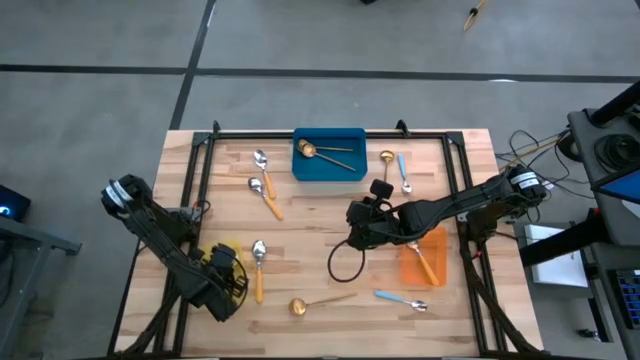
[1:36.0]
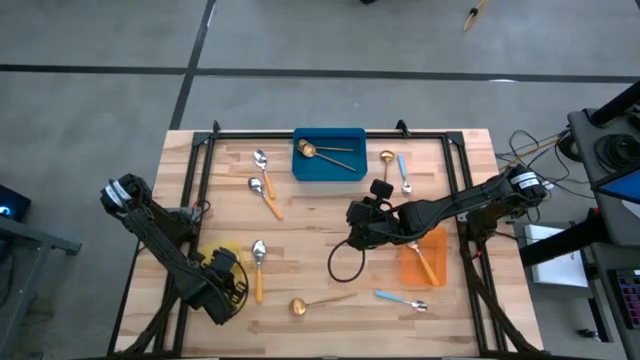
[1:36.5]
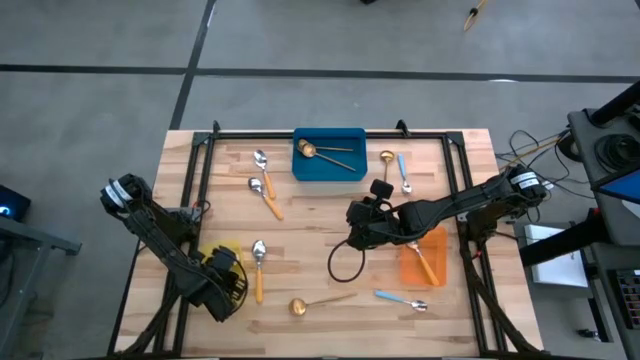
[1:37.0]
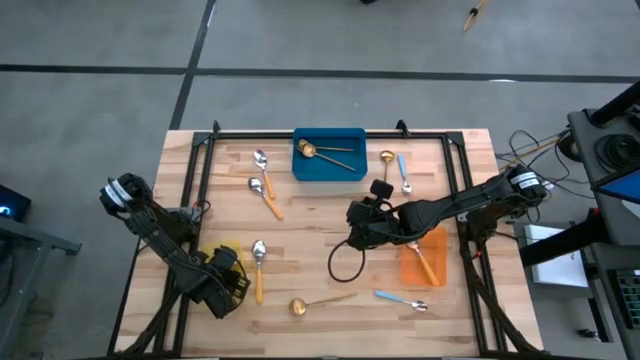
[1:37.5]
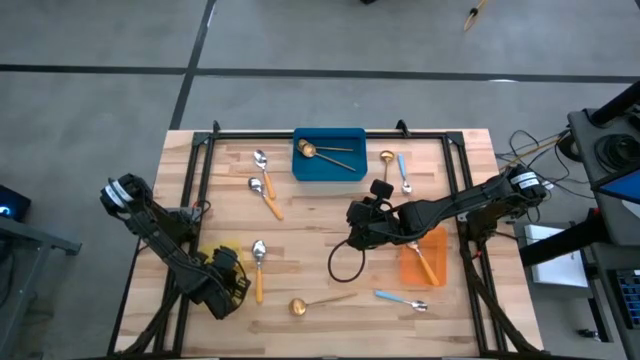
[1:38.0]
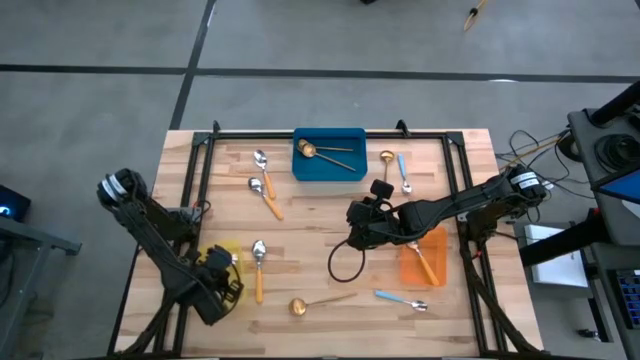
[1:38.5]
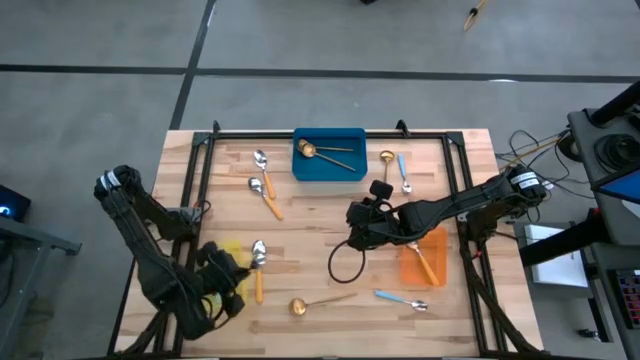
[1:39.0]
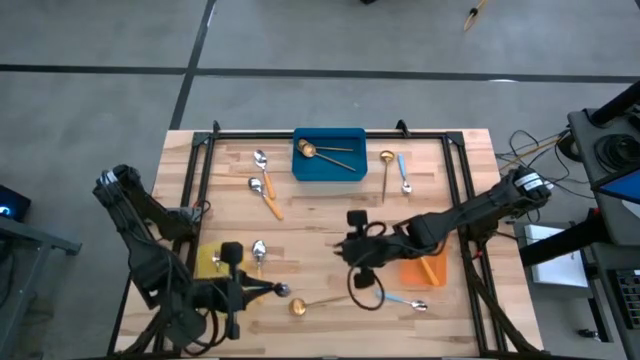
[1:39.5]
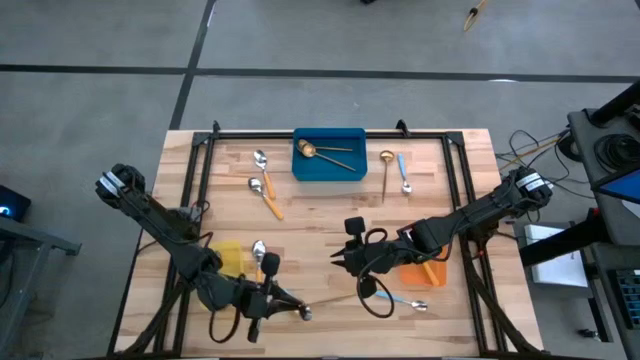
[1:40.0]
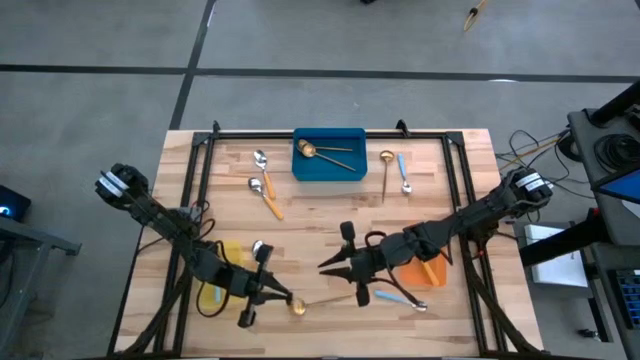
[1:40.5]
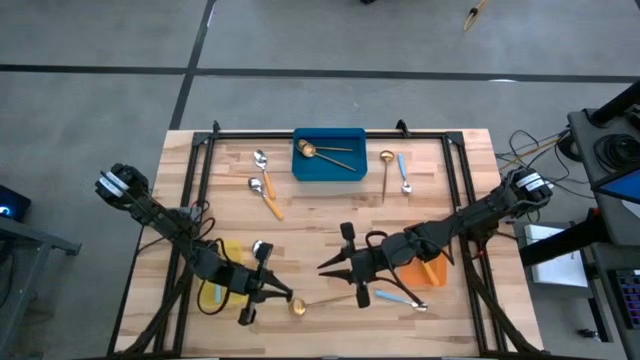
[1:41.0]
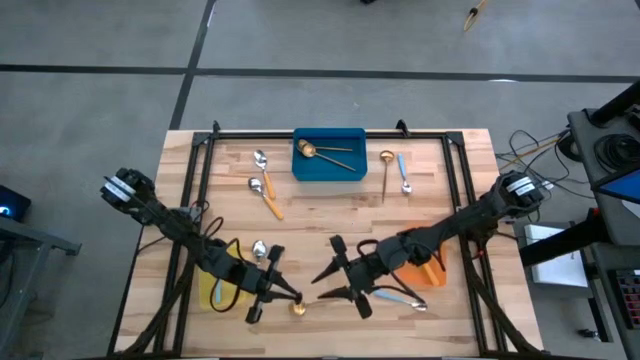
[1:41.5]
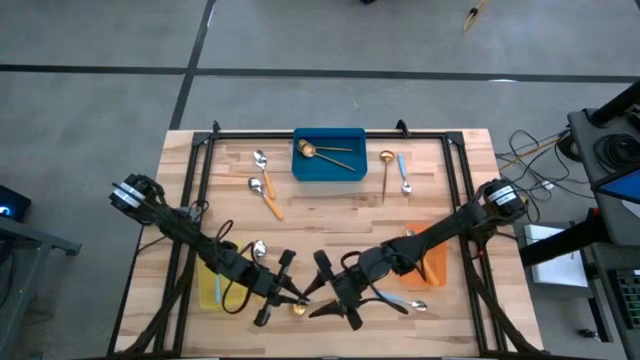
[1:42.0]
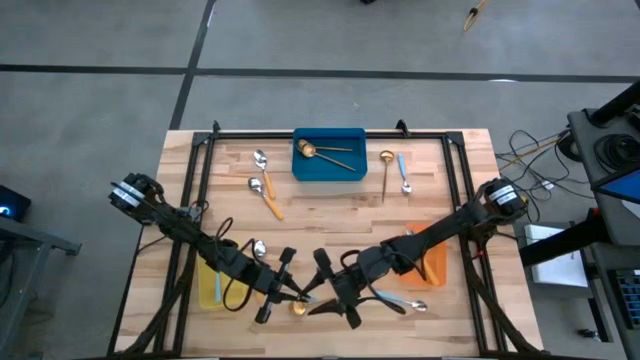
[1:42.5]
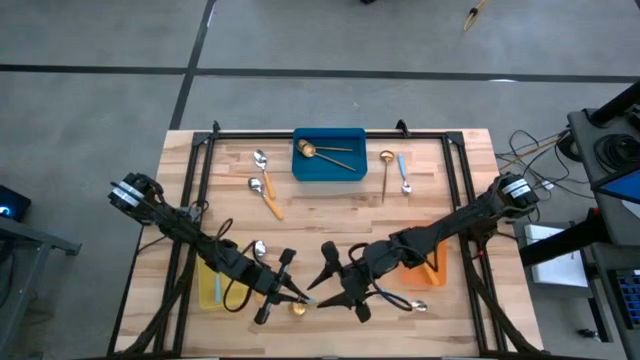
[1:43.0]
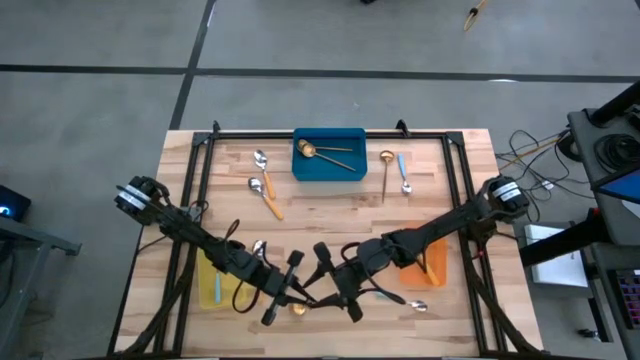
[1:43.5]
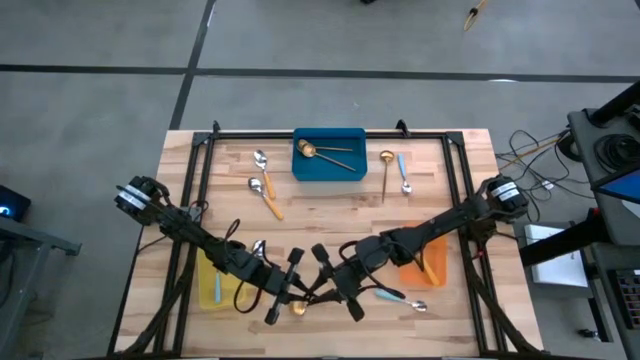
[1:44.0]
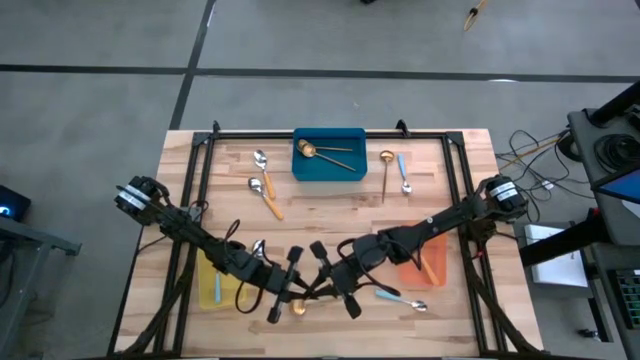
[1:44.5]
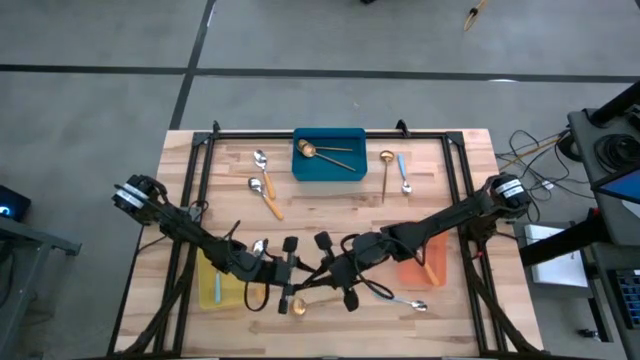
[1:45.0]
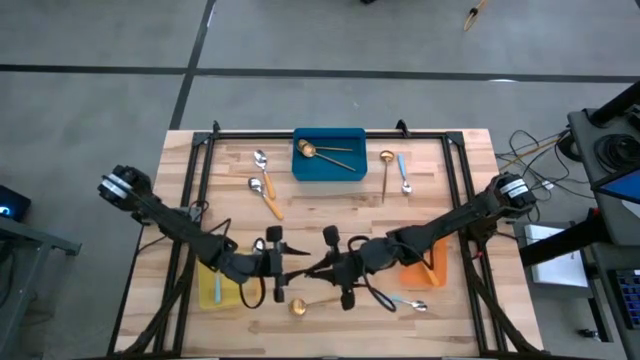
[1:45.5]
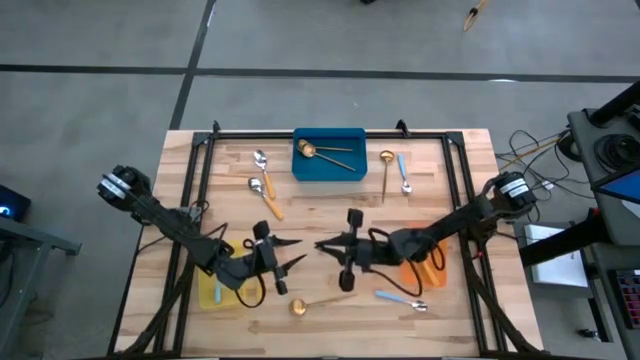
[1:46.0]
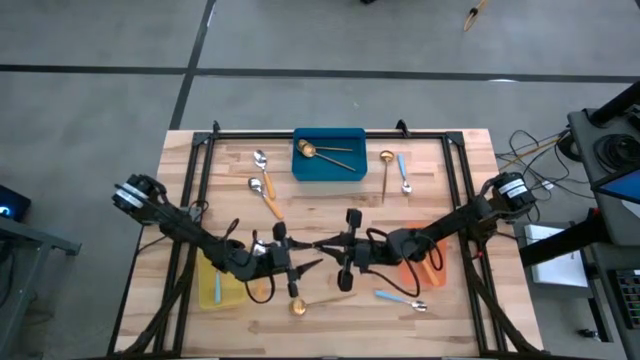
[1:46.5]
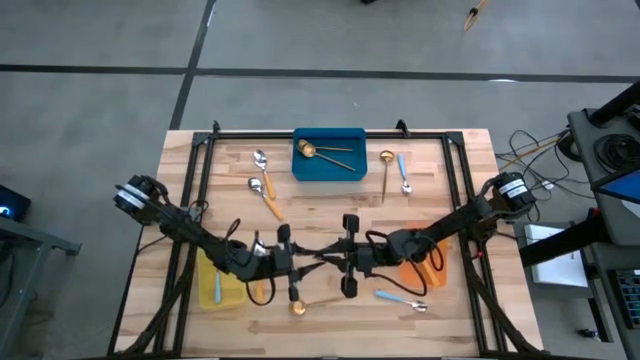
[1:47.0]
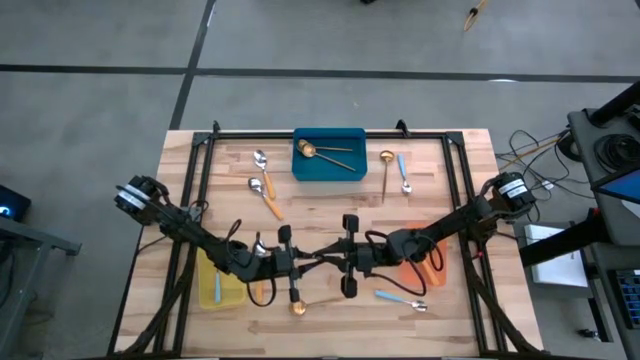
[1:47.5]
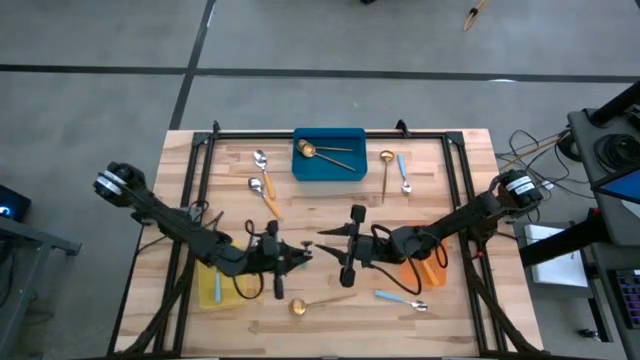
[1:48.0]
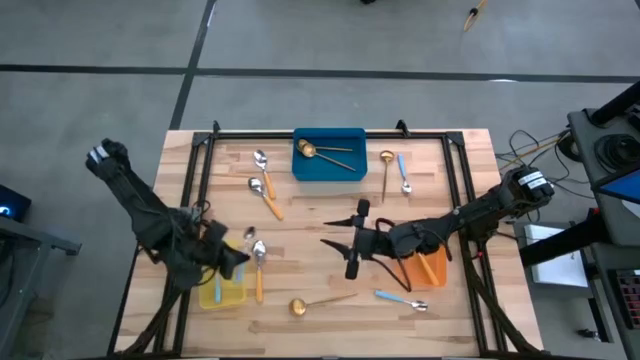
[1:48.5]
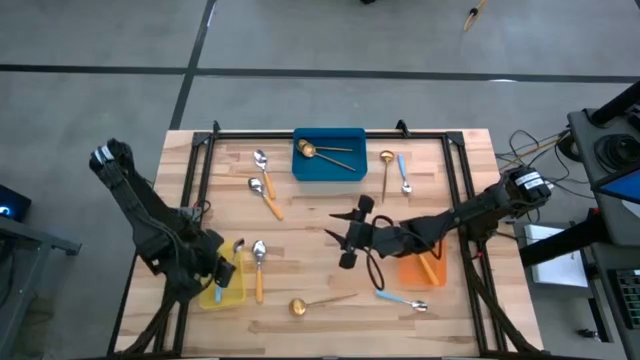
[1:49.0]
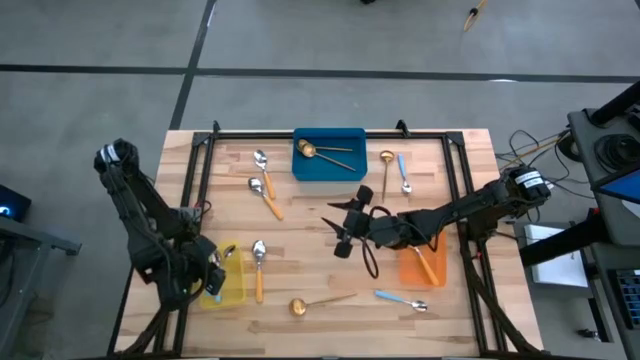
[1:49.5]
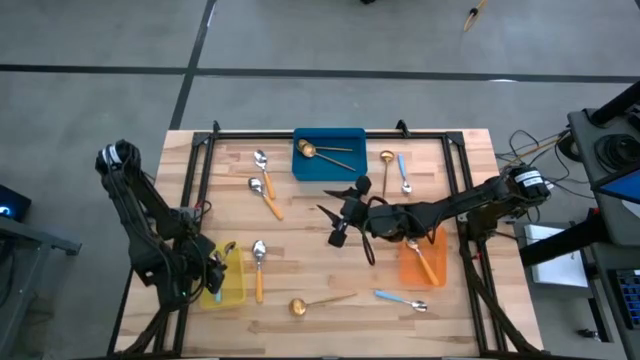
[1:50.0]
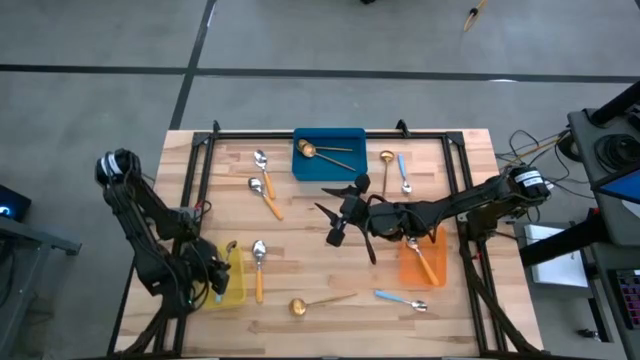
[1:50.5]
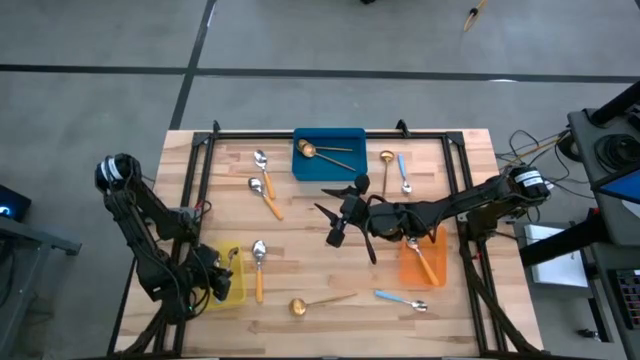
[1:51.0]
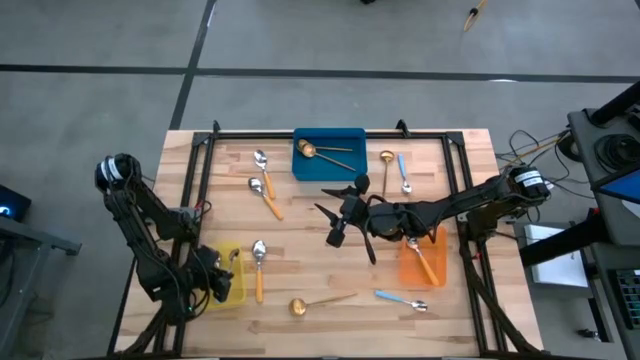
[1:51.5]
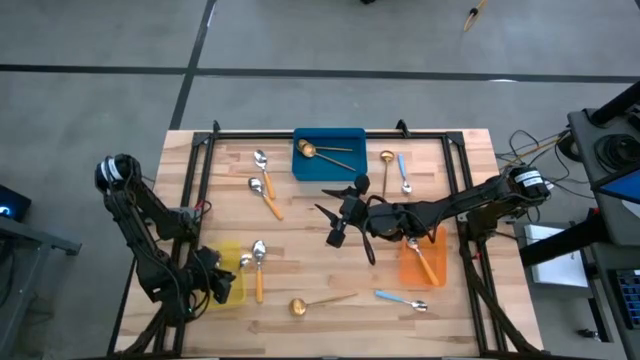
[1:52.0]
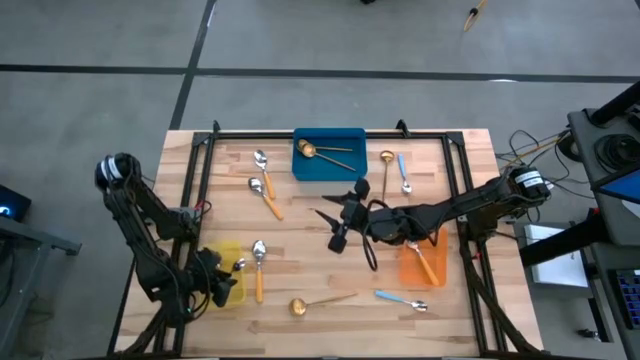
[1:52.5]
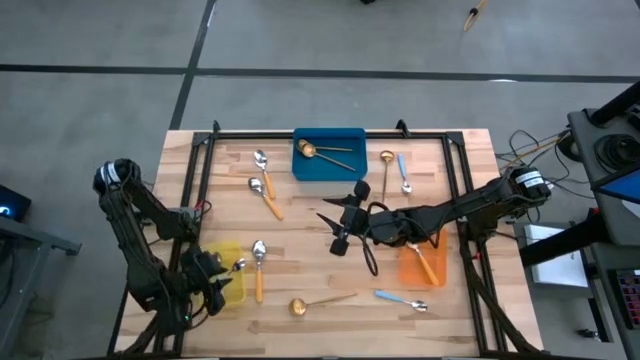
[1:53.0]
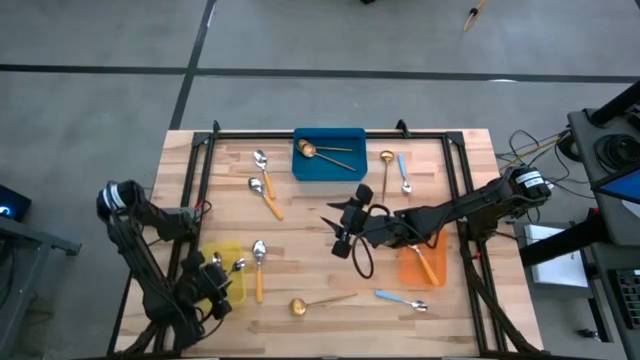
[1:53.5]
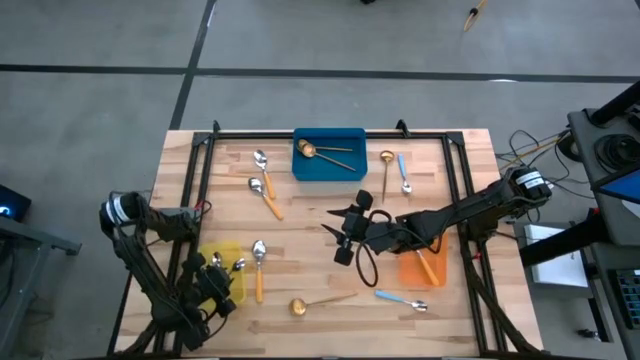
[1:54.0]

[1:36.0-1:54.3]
Task: Sort silverware by color (type)
Put the blue spoon into the yellow bin

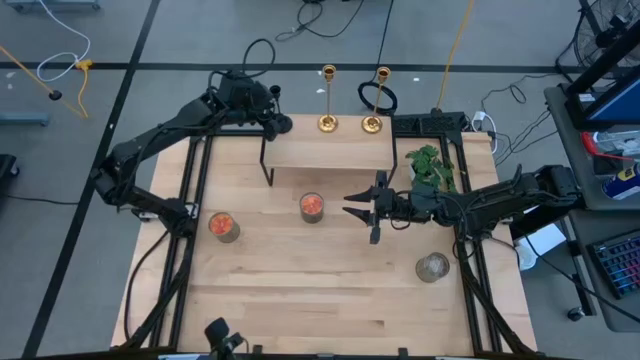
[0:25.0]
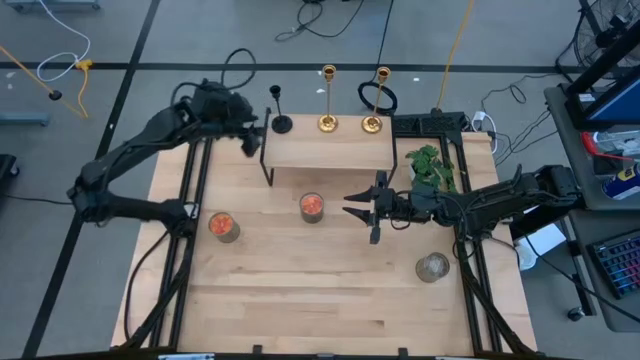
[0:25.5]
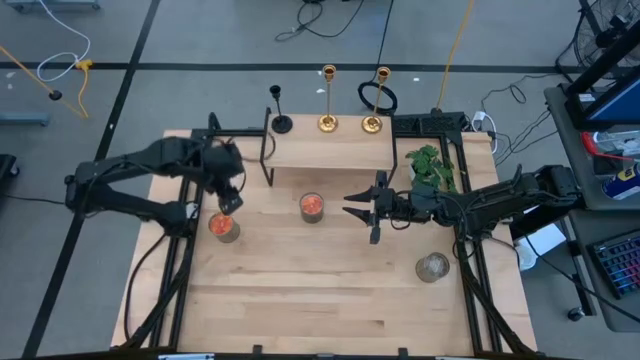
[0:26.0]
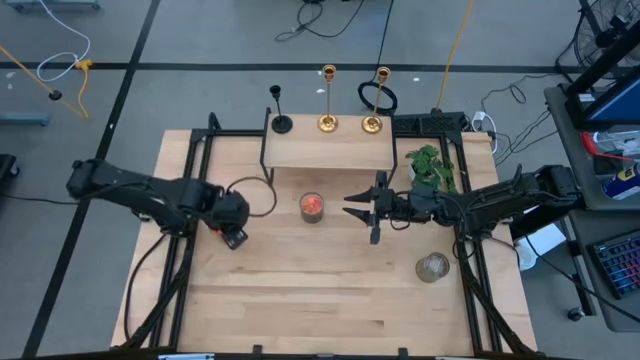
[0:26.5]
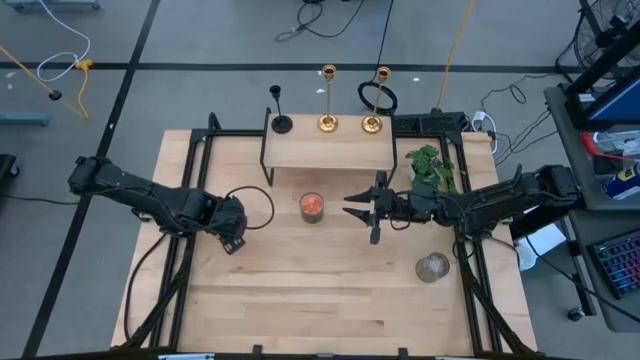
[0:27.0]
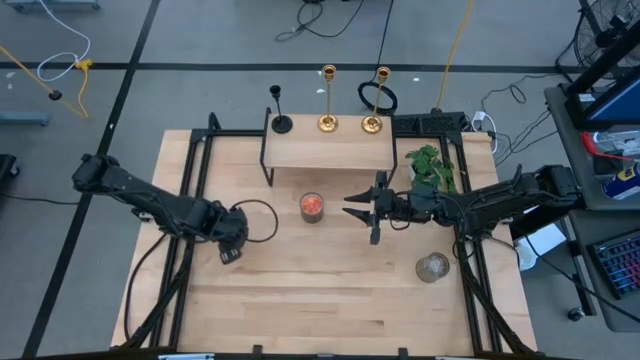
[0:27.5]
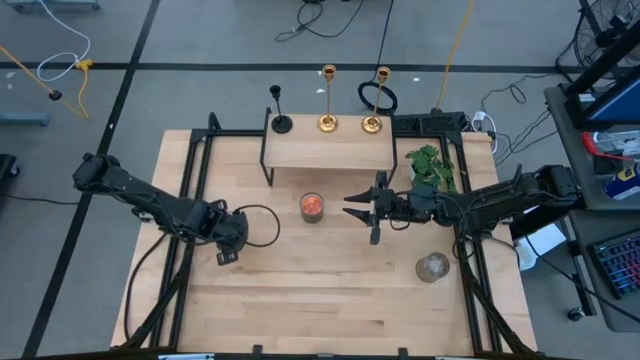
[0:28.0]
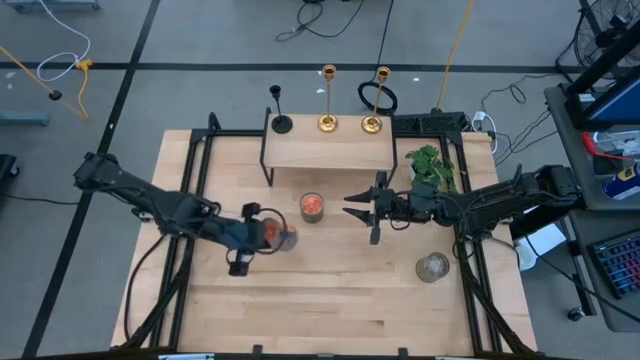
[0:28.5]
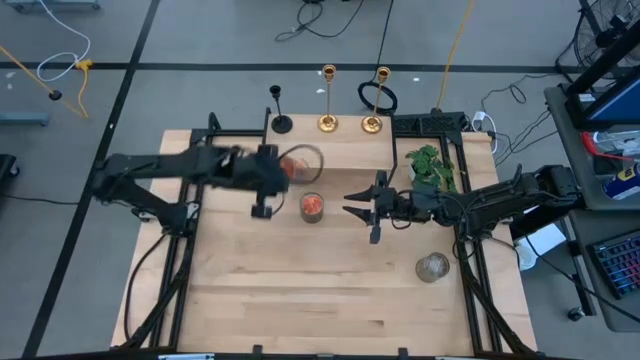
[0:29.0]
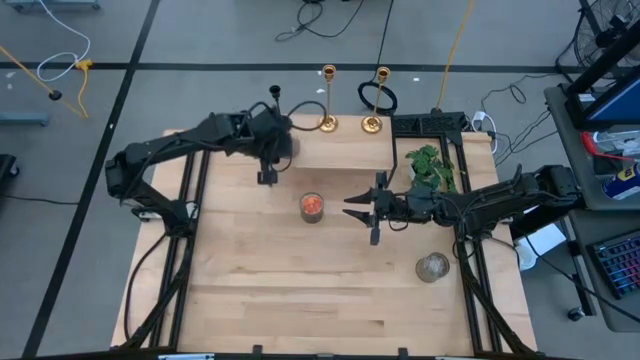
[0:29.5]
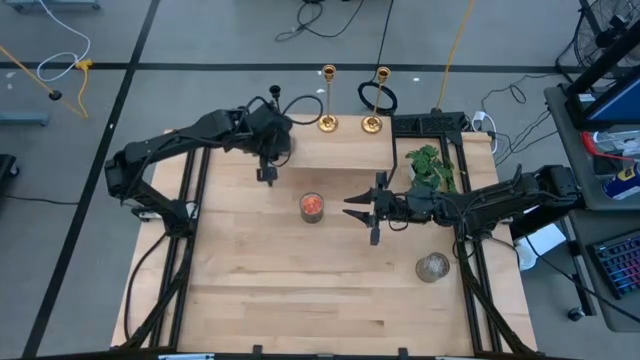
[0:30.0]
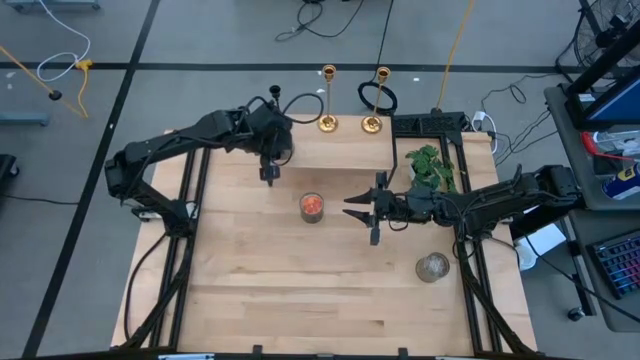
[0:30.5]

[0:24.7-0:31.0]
Task: Pick & Place candle stick holders
Put the left orange scented candle on the shelf
